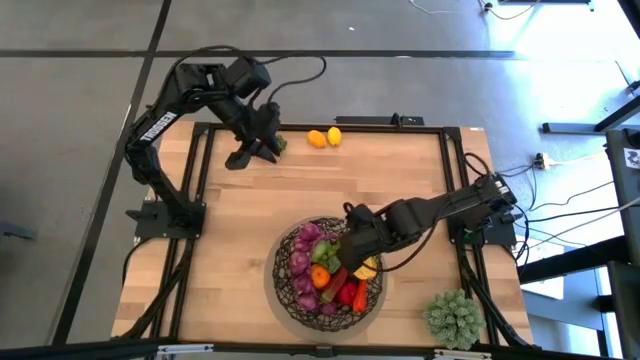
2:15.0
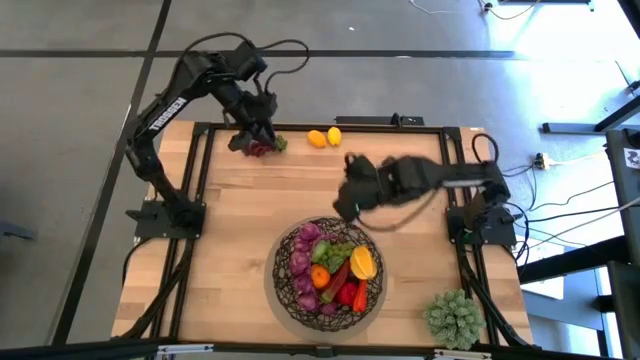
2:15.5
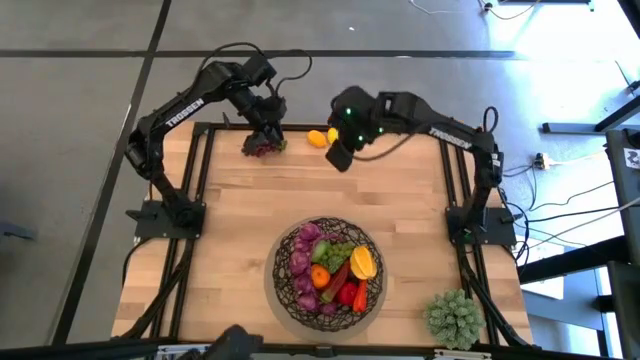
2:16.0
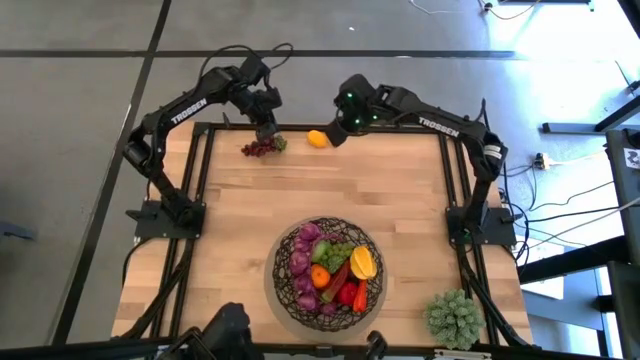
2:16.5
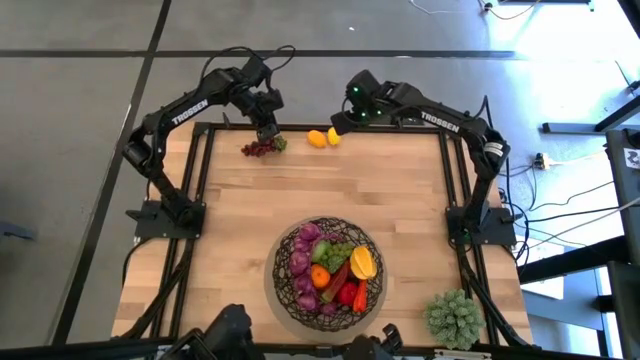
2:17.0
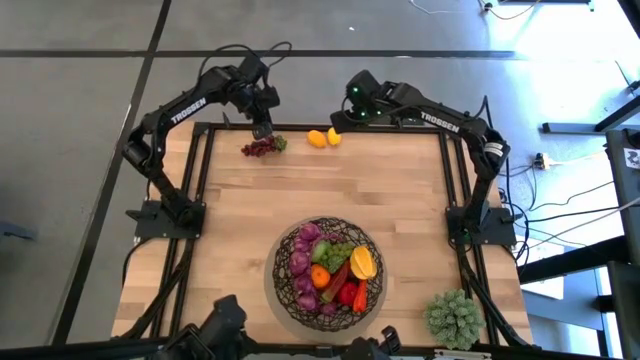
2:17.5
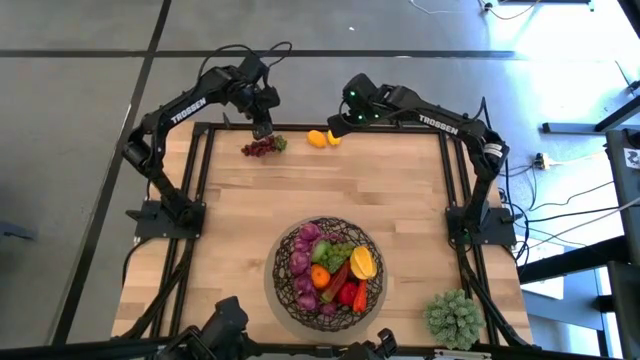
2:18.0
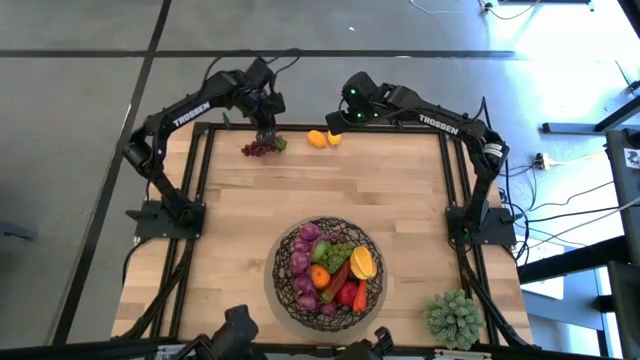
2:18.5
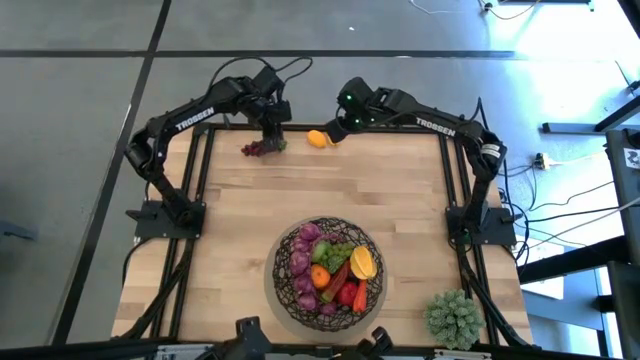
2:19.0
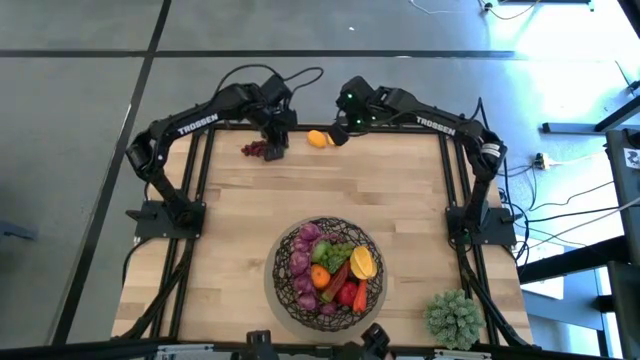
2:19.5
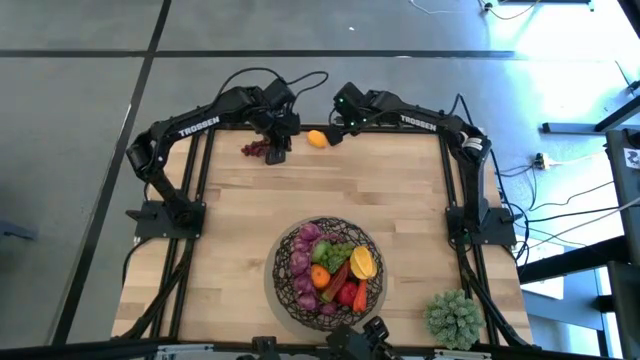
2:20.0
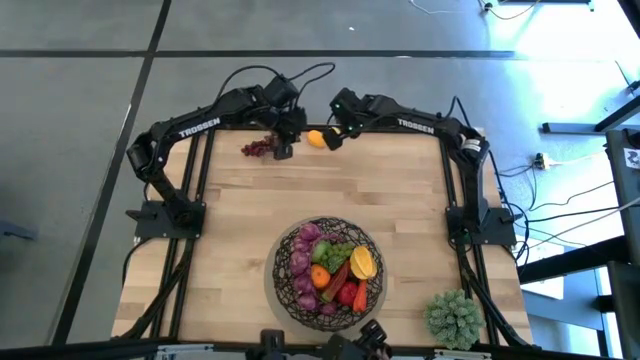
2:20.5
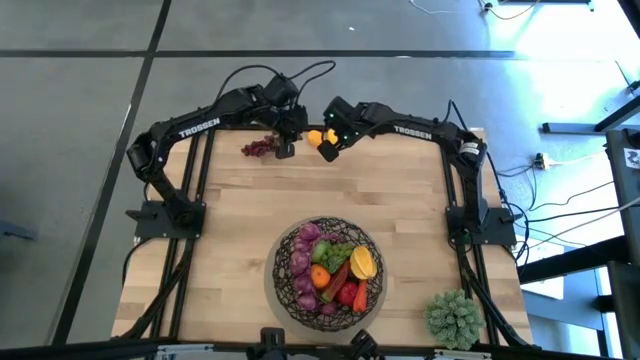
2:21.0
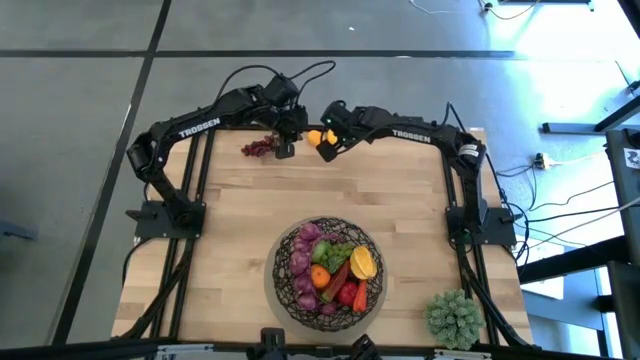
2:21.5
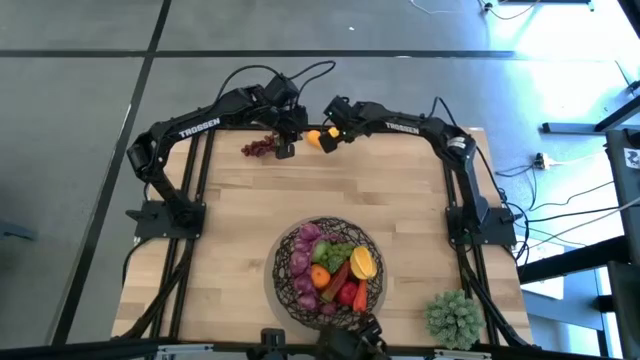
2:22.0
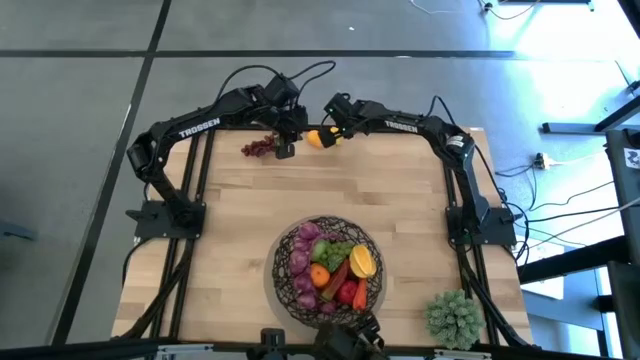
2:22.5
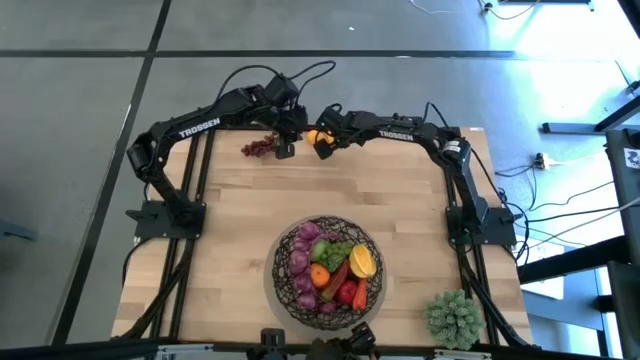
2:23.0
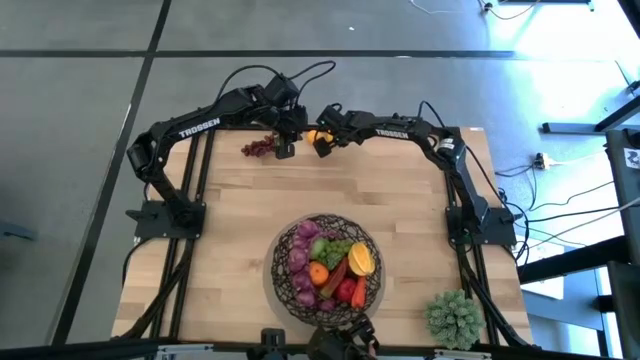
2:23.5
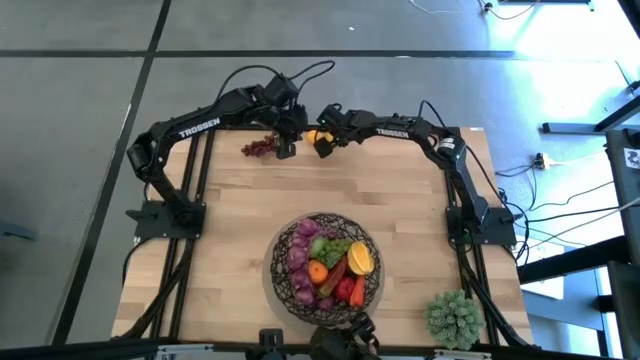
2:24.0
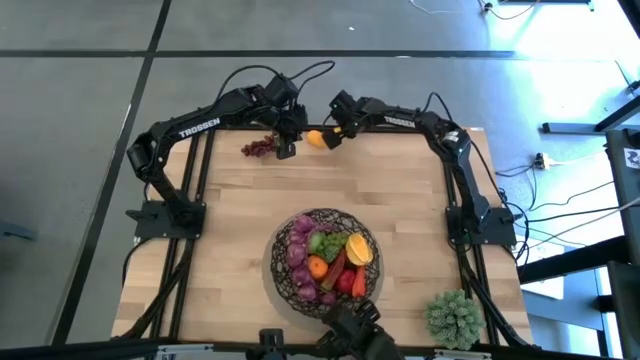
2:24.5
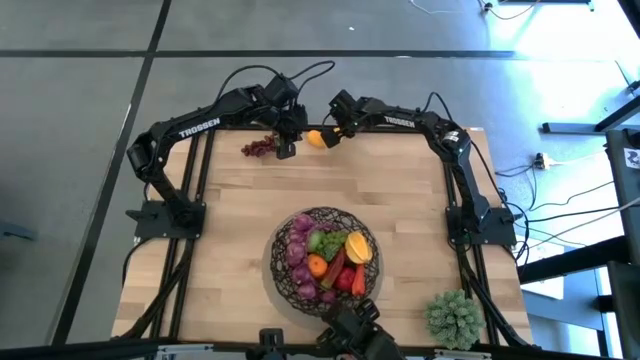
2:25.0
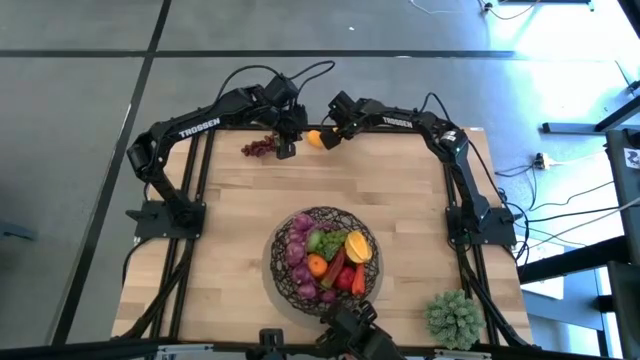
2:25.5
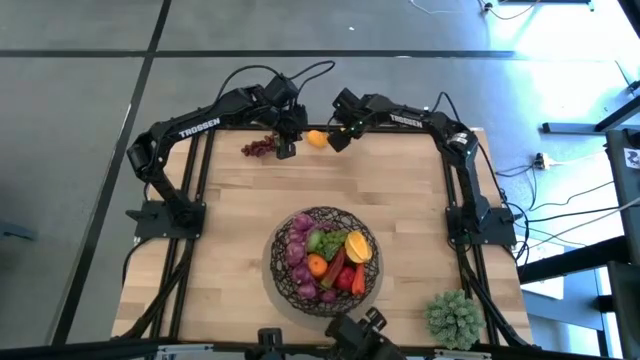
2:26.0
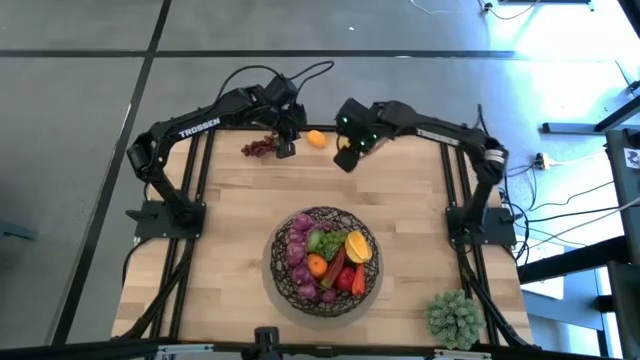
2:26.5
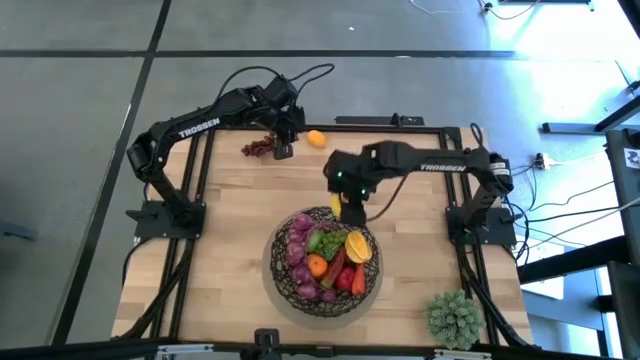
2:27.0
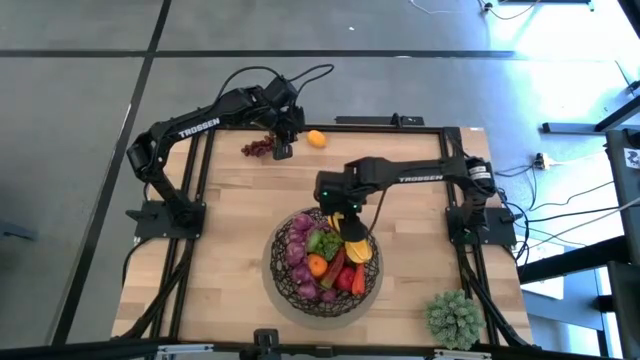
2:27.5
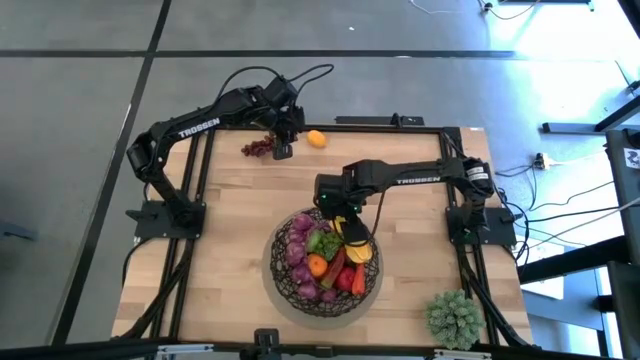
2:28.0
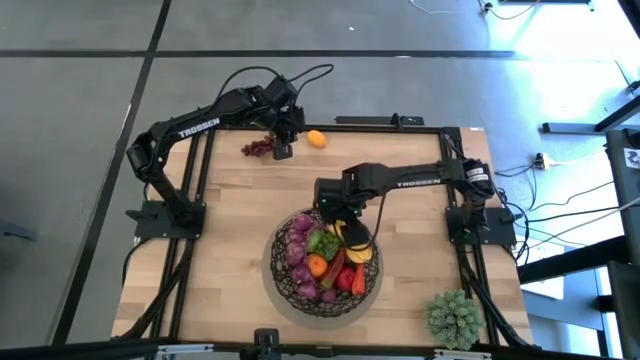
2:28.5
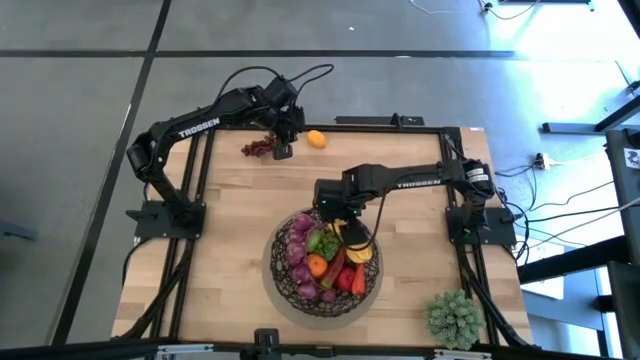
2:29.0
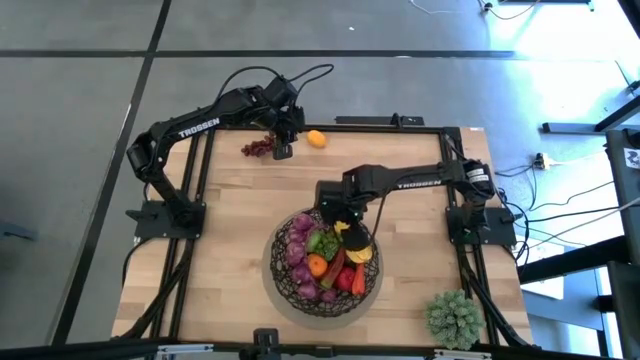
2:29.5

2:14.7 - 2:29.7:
Task: Build produce basket
Put the right lemon into the mesh basket

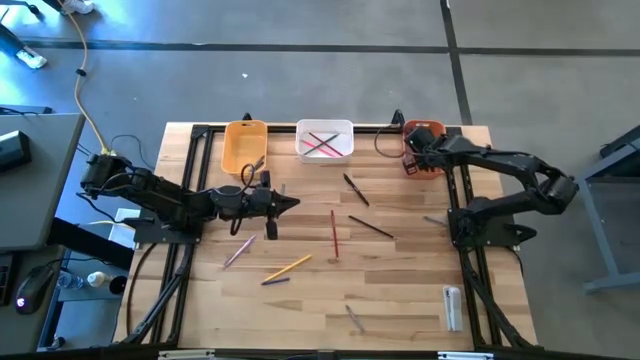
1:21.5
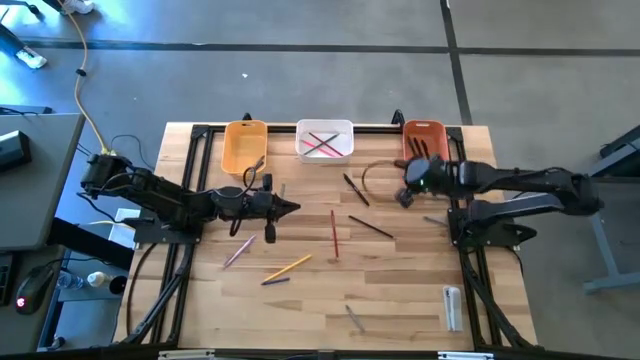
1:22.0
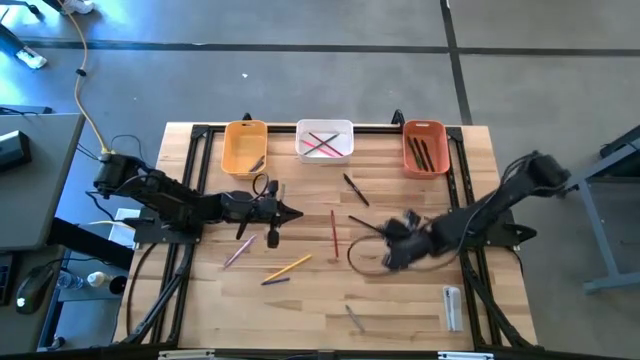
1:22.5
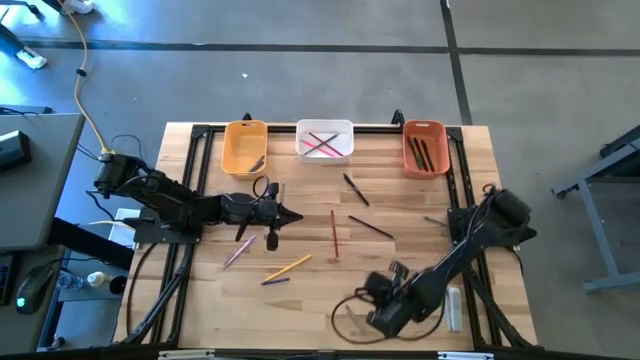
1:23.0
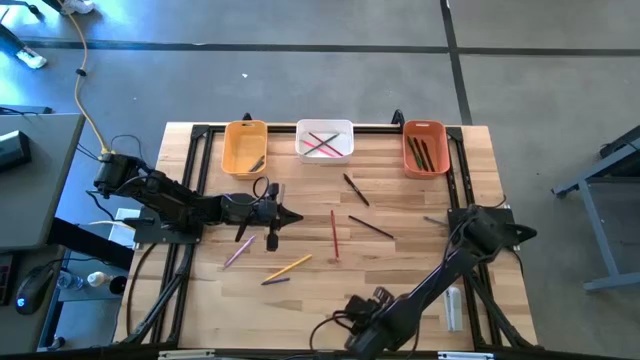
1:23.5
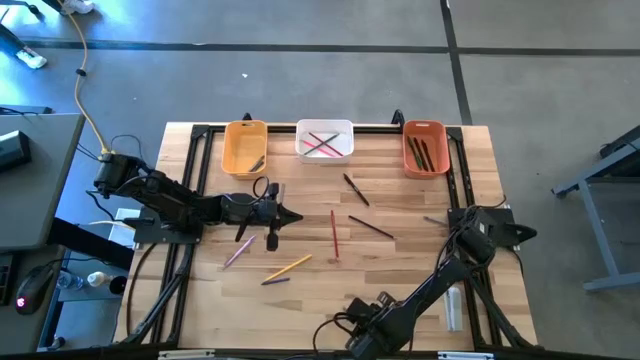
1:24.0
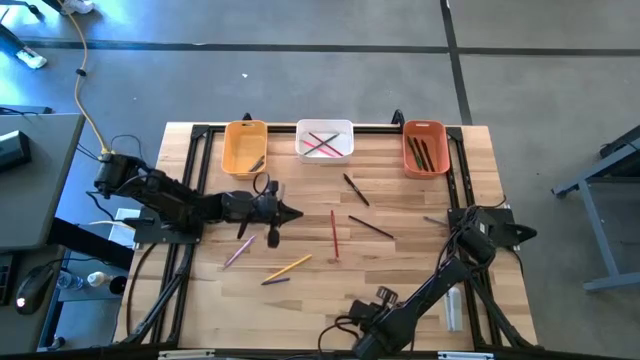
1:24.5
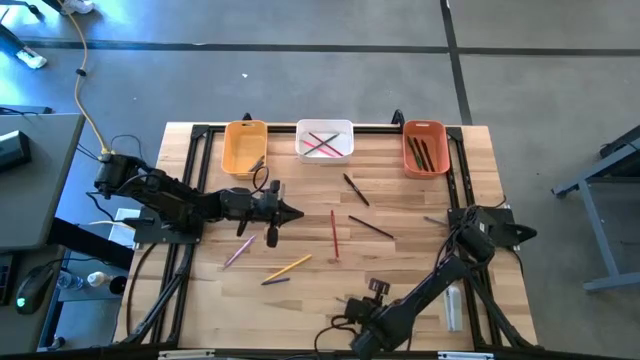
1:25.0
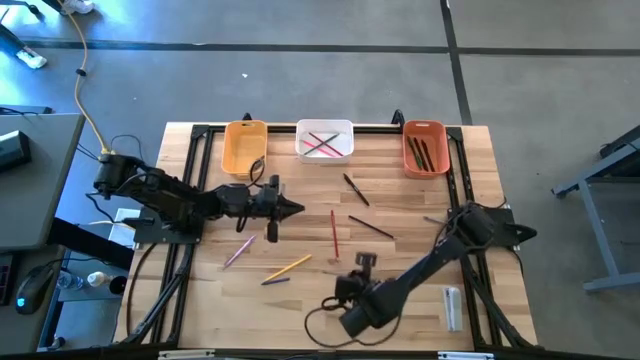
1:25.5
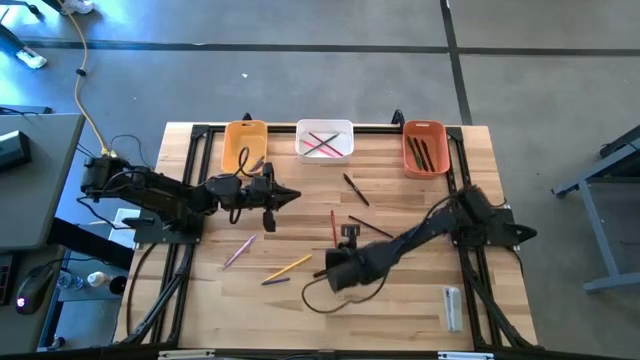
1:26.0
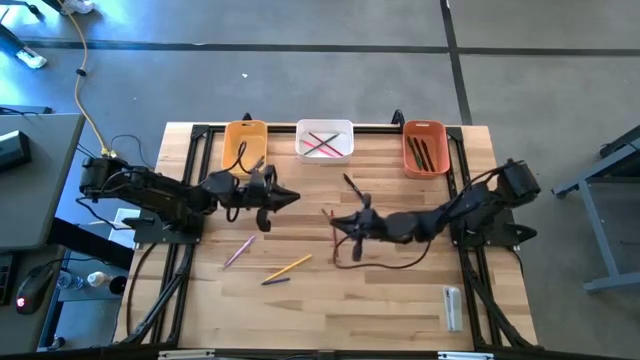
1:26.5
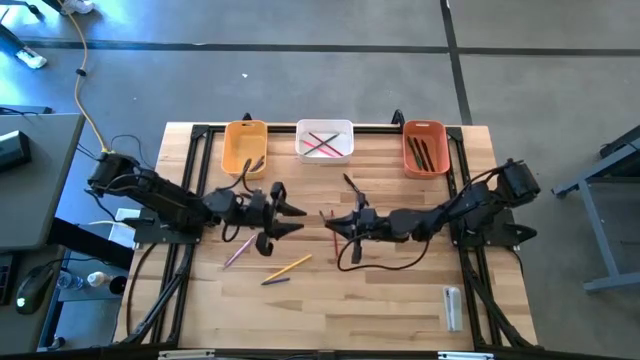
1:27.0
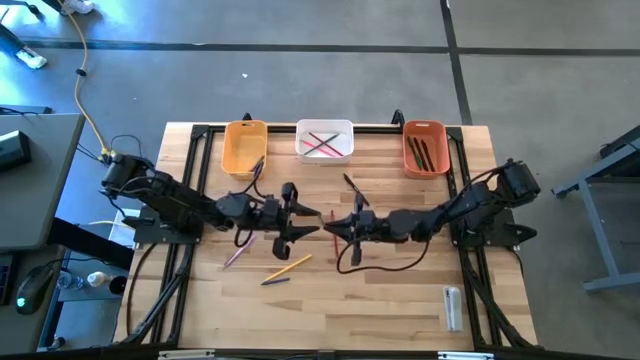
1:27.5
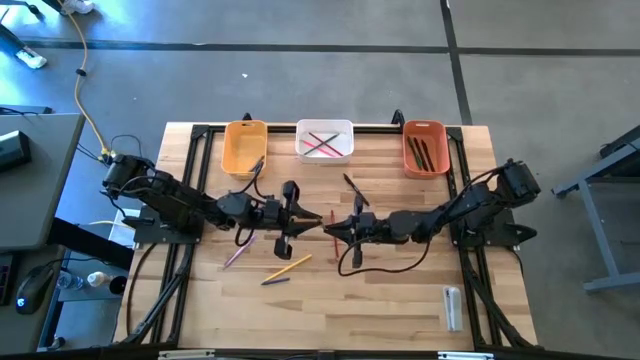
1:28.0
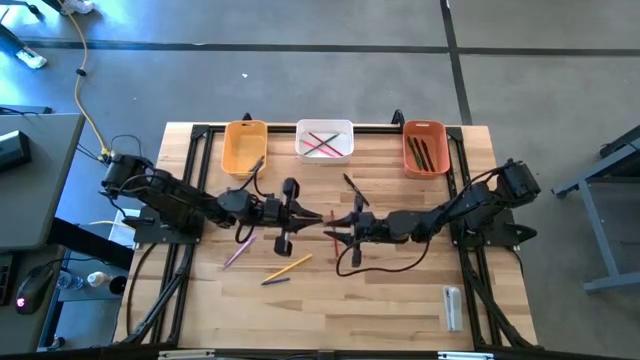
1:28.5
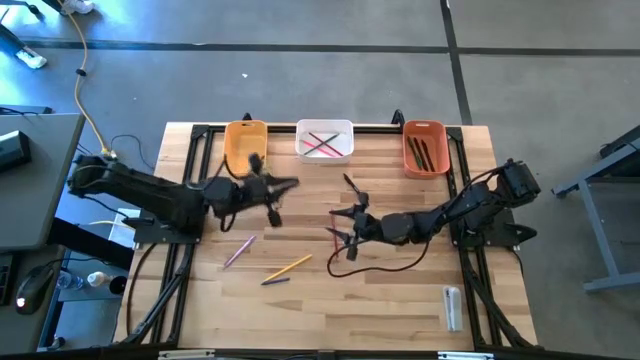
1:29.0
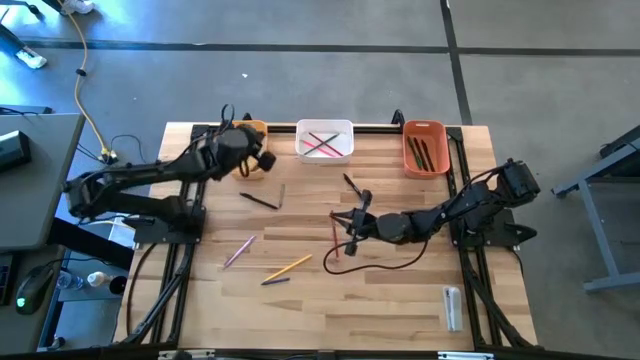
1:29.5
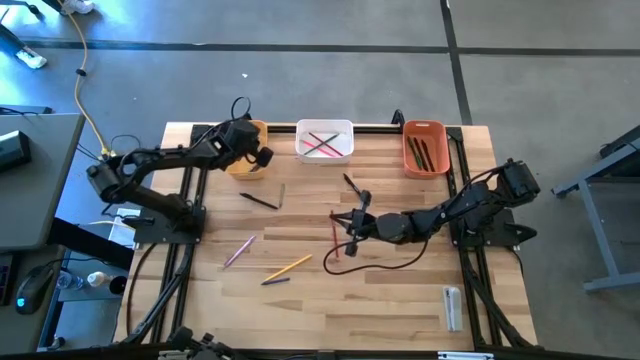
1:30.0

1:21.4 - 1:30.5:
Task: Sort crayons/erasers/pens/pencils in bins
Put the gray crayon into the yellow bin
